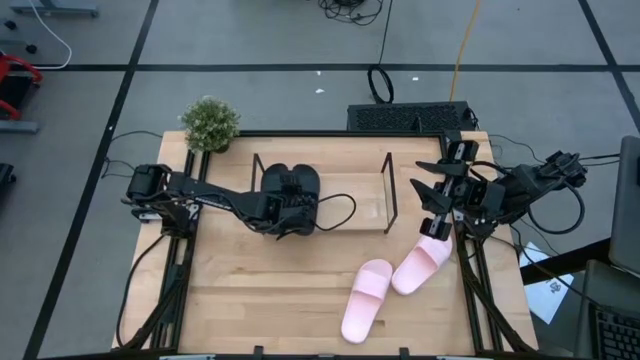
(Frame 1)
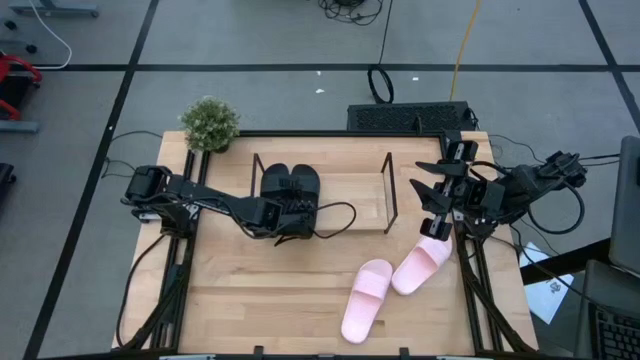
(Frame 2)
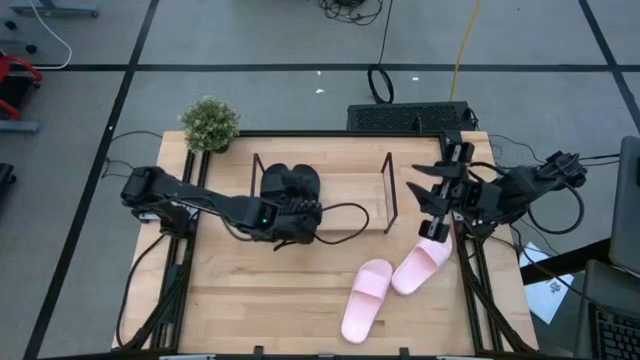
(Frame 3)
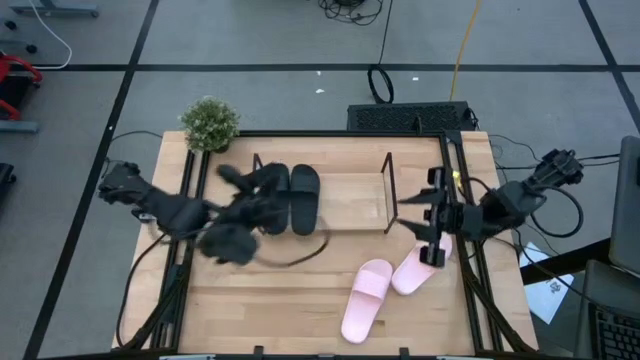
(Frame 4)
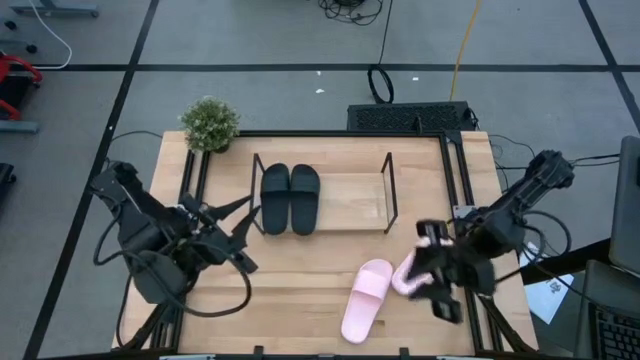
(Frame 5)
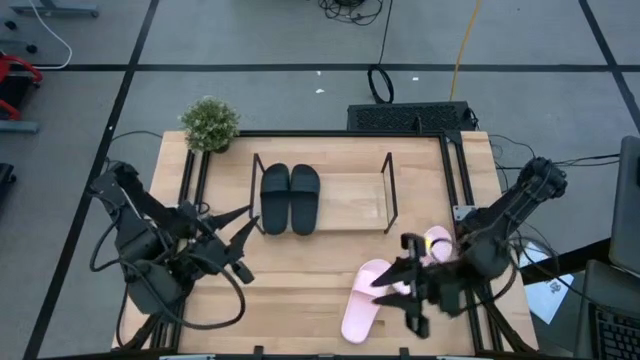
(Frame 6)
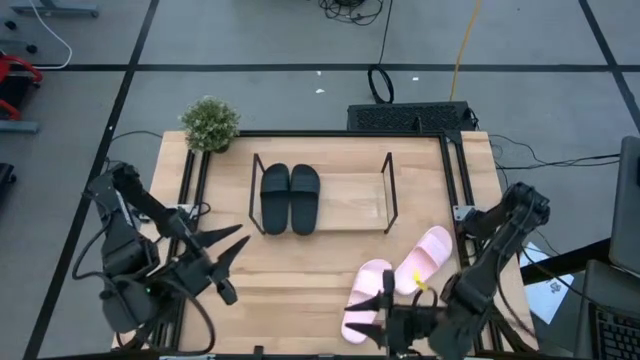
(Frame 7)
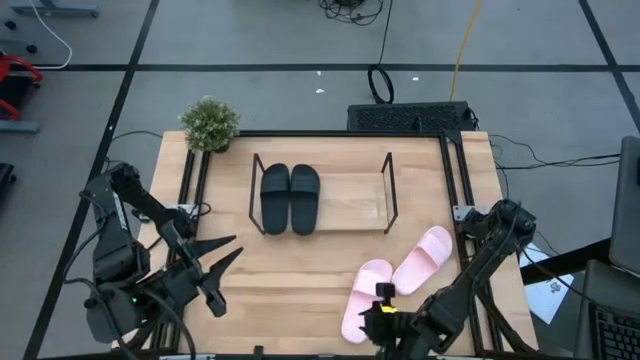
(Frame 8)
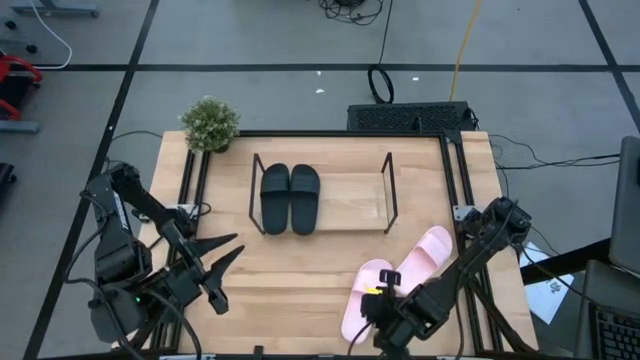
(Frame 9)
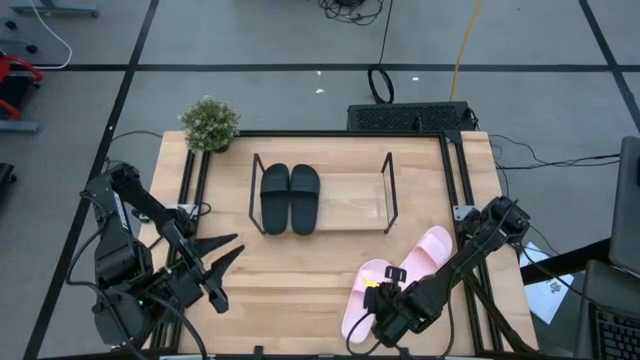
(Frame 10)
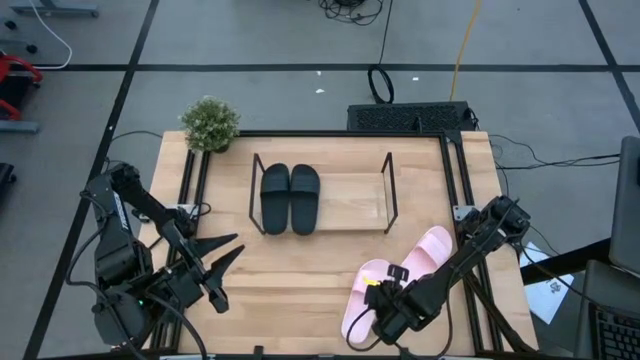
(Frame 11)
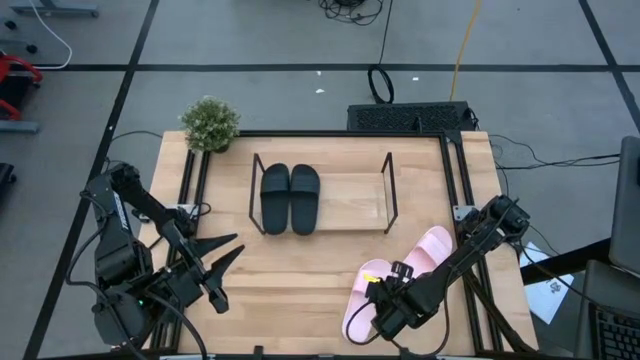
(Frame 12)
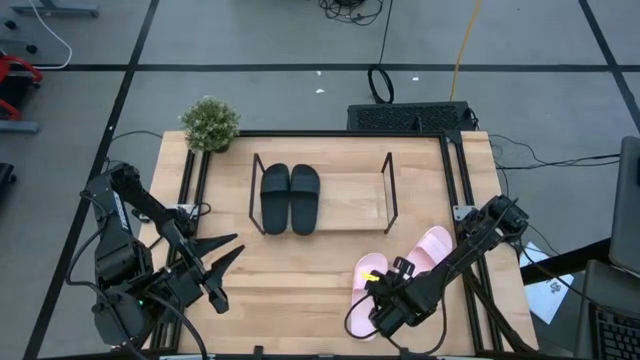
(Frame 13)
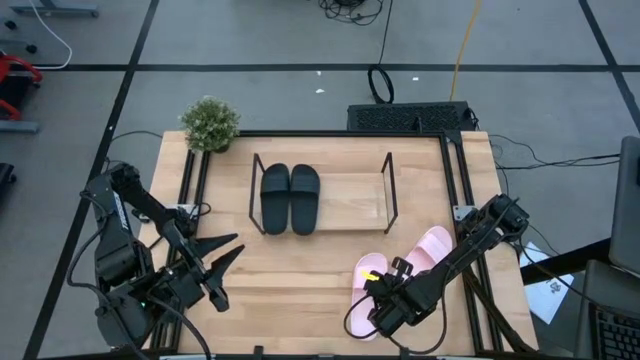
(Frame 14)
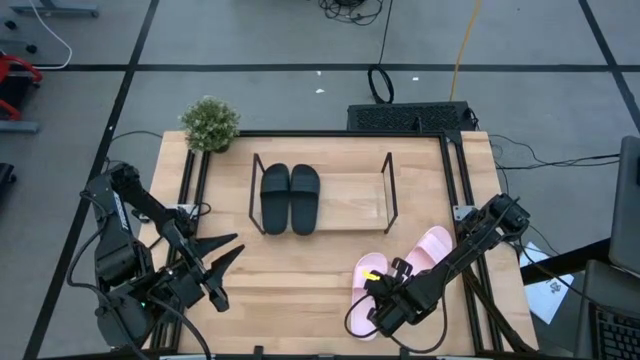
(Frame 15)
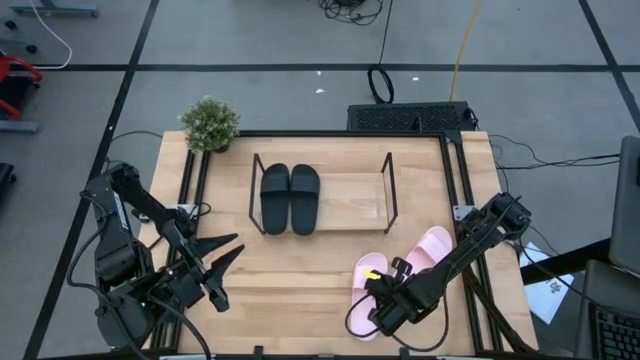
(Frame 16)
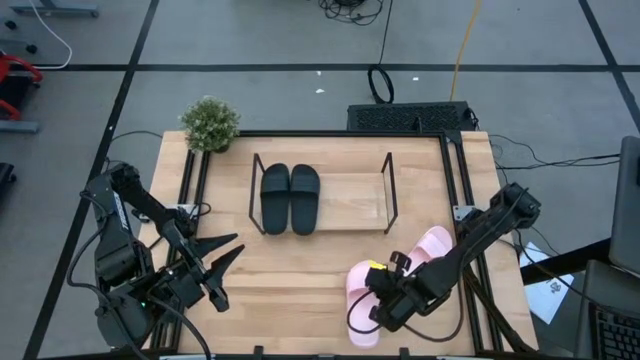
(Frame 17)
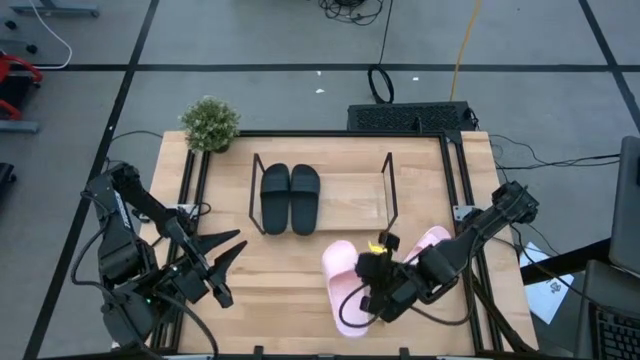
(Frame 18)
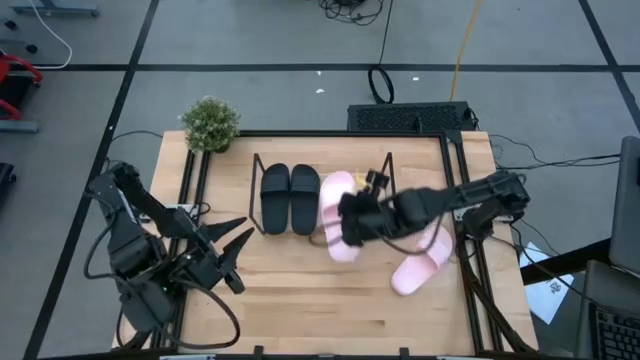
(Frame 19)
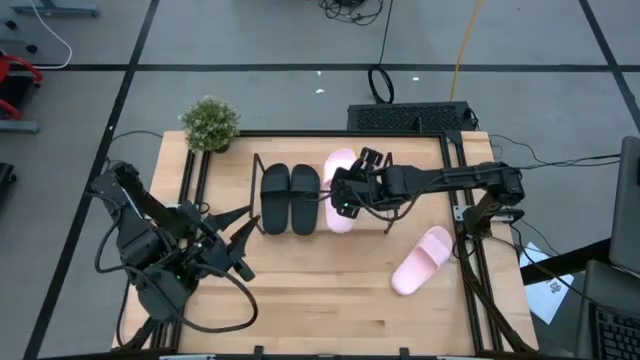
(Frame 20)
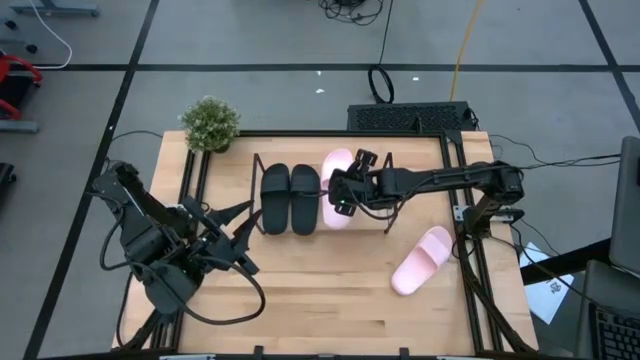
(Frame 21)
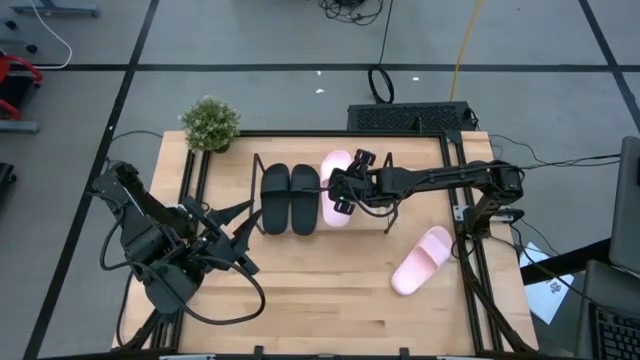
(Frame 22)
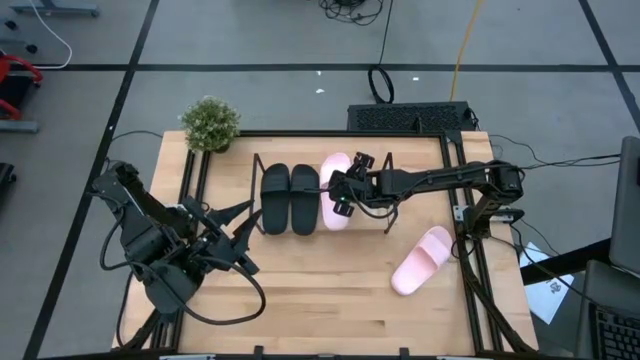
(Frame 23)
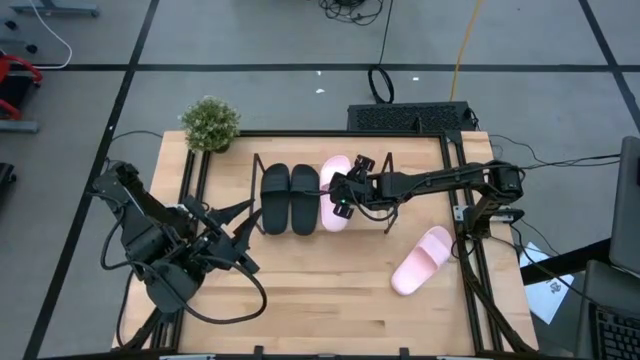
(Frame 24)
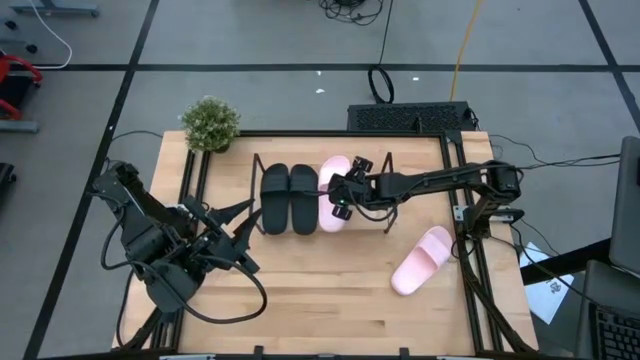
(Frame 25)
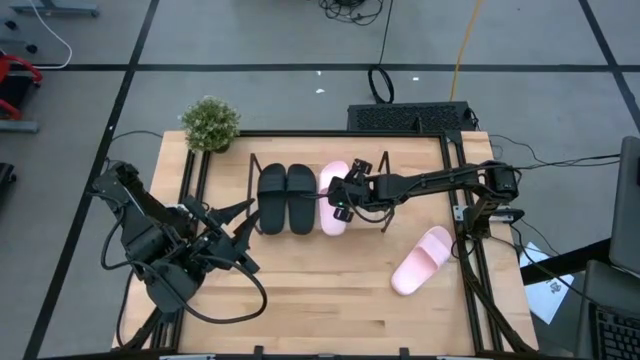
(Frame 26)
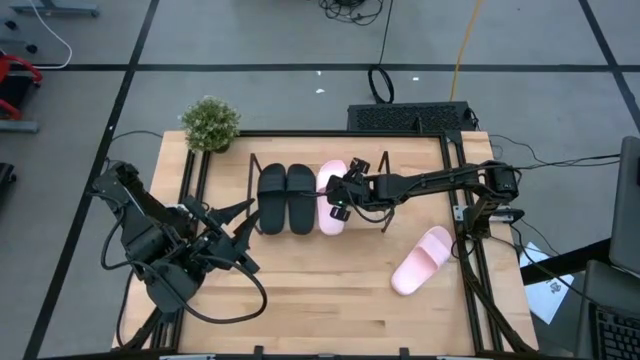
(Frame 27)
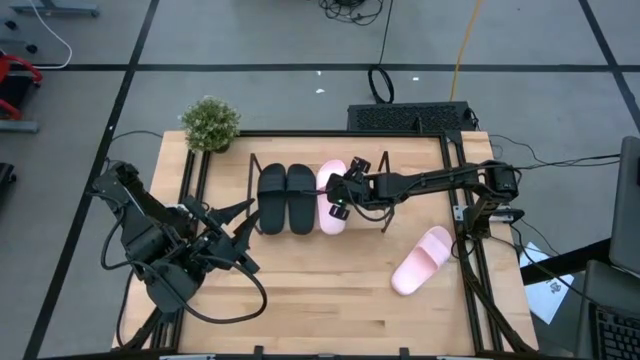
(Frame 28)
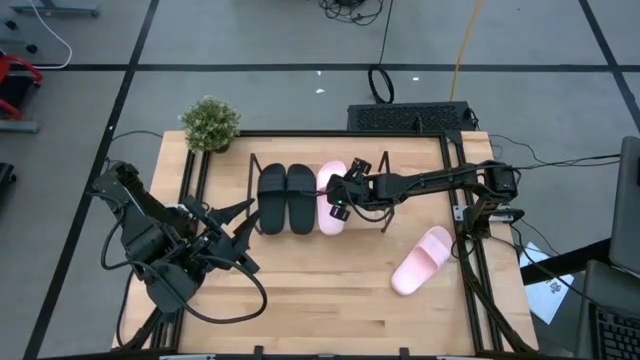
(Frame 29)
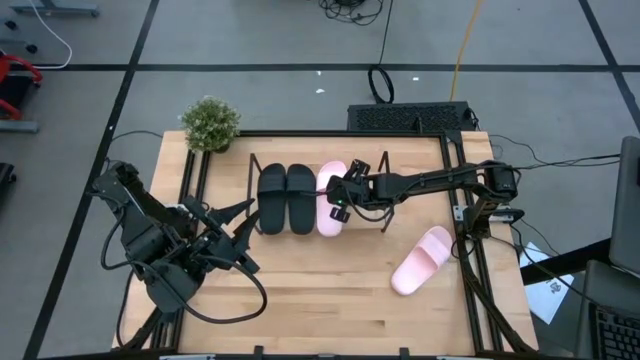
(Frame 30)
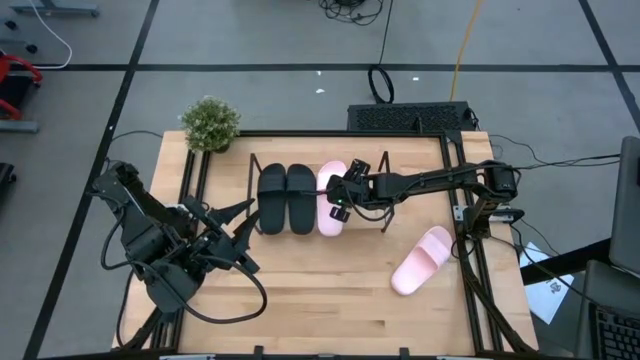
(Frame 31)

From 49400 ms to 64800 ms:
Task: Pick and place slides into the shelf
Put the left pink slipper on the shelf

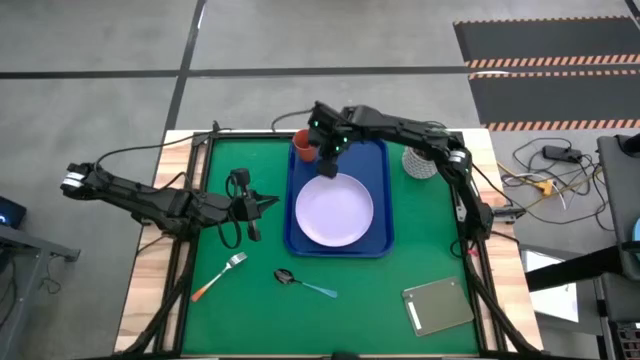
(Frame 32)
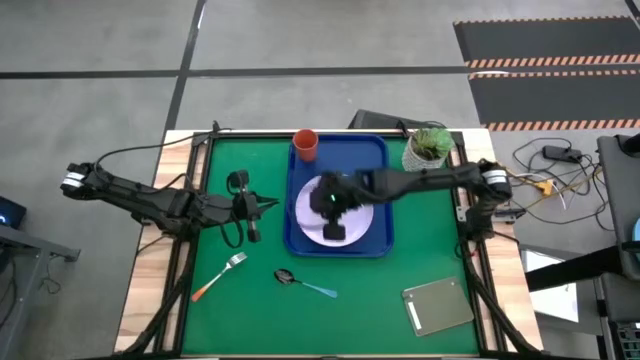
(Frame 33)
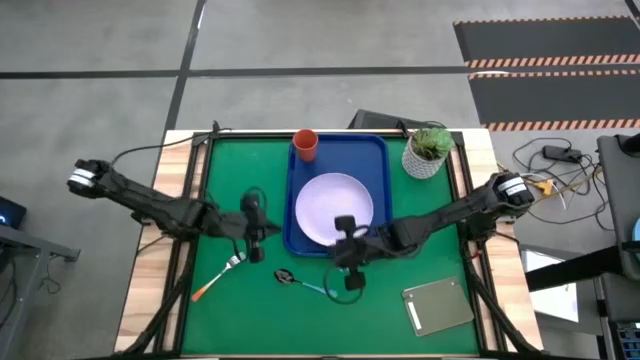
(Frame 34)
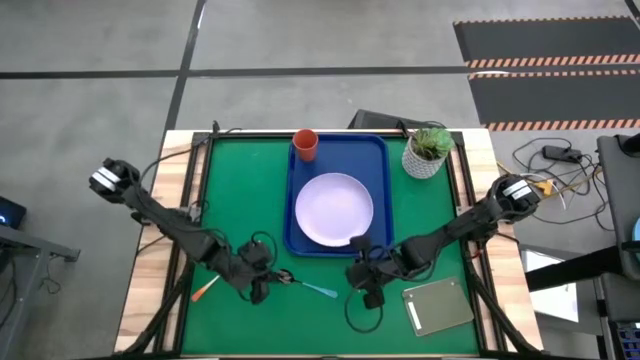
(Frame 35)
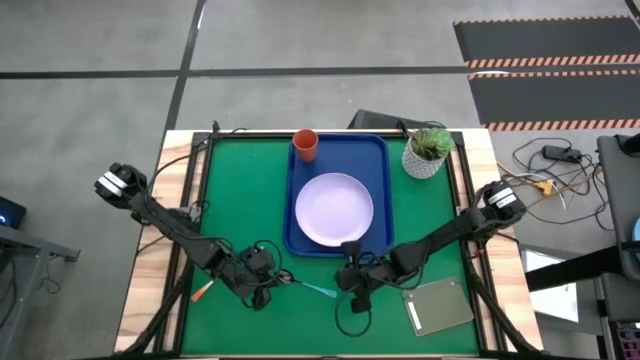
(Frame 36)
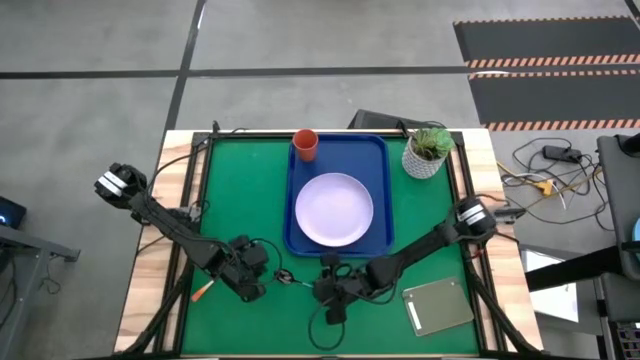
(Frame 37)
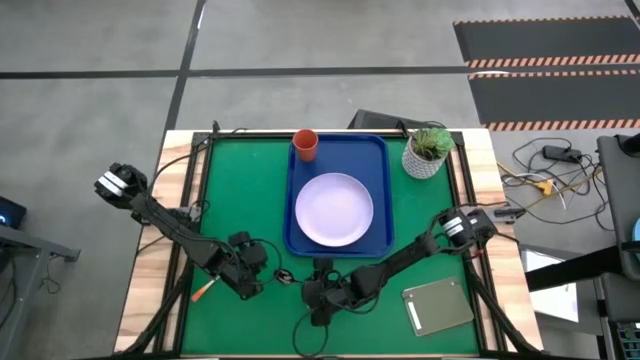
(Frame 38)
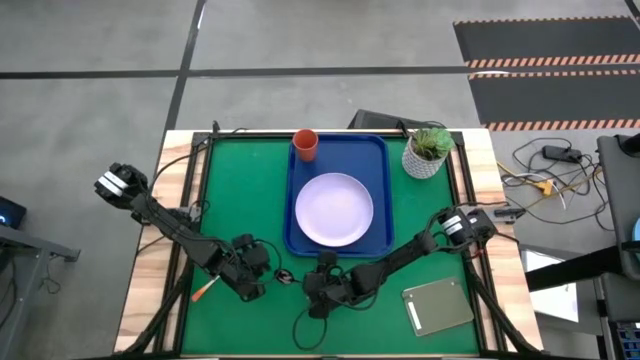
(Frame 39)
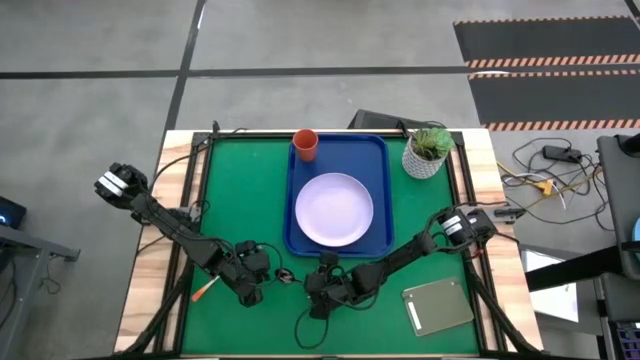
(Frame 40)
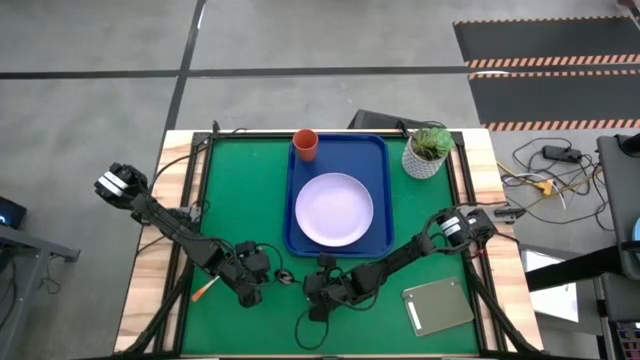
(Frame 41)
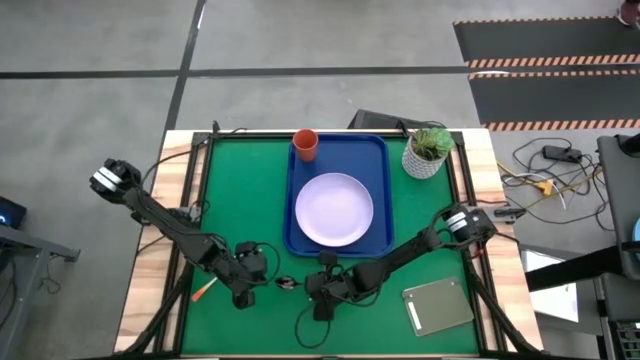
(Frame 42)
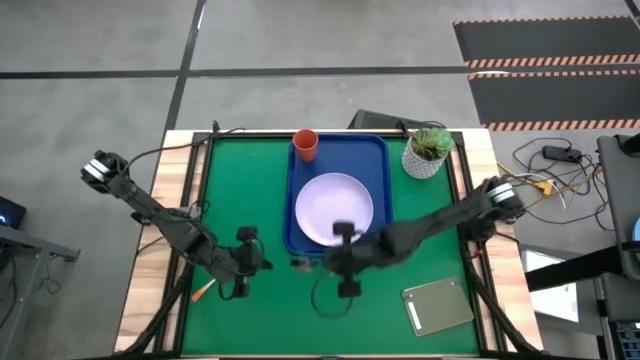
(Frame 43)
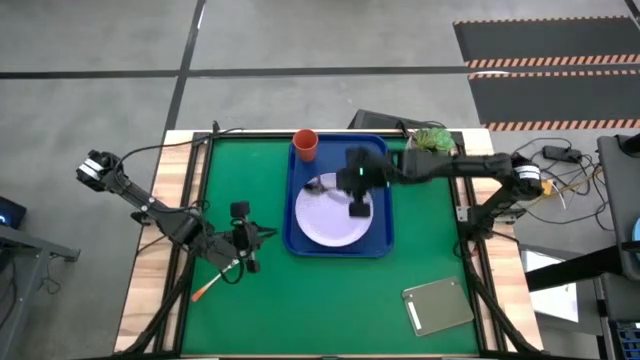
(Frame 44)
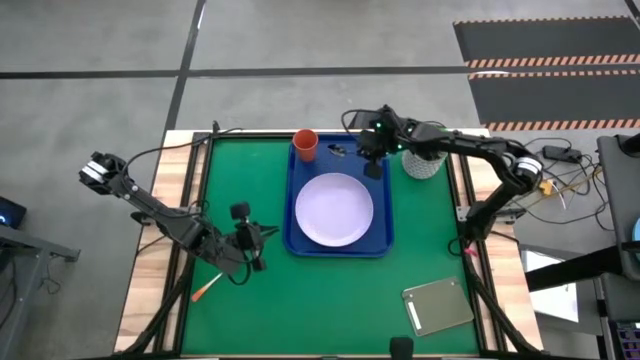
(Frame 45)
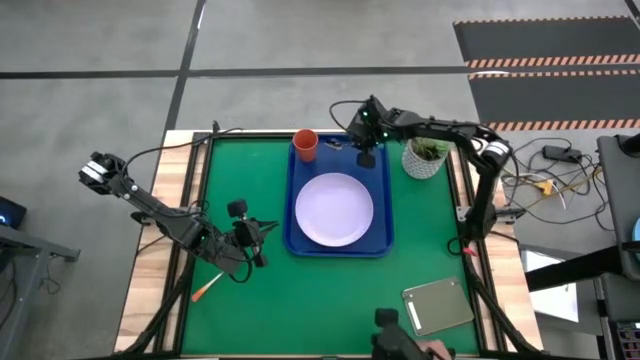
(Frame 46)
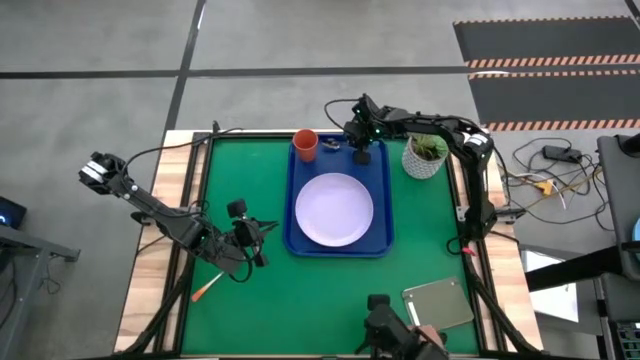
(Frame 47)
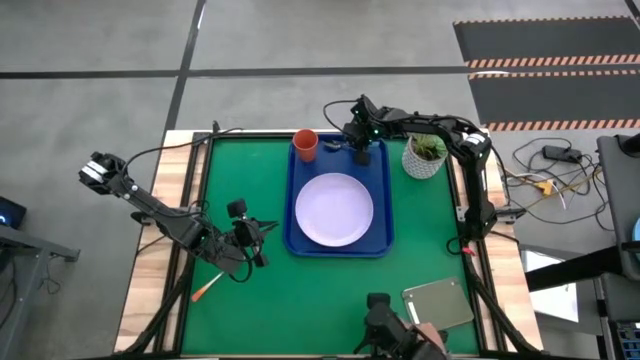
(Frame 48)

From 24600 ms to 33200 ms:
Task: Pick and place plate/cup/fork/spoon on tray
Put the blue spoon on the blue tray to the right of the white plate
